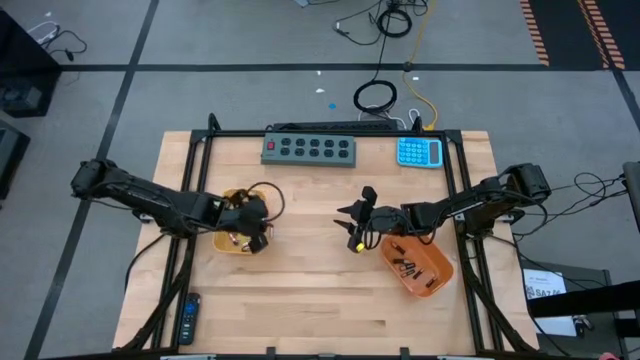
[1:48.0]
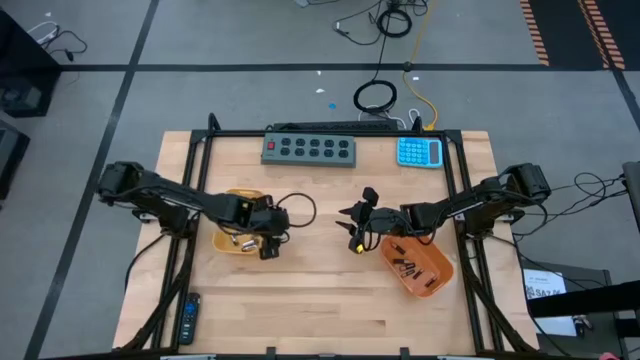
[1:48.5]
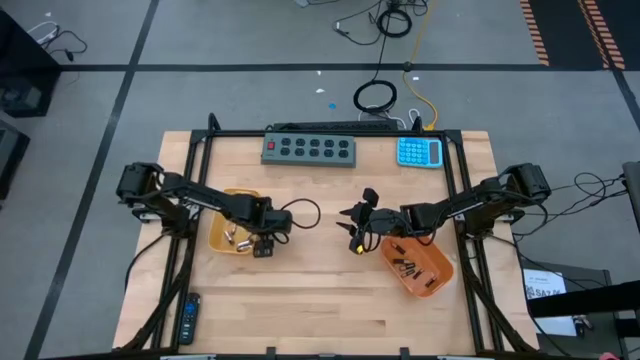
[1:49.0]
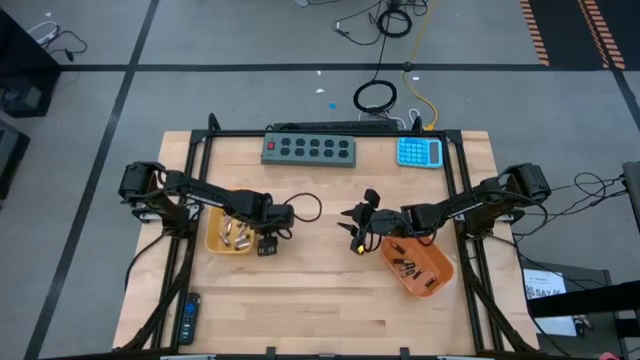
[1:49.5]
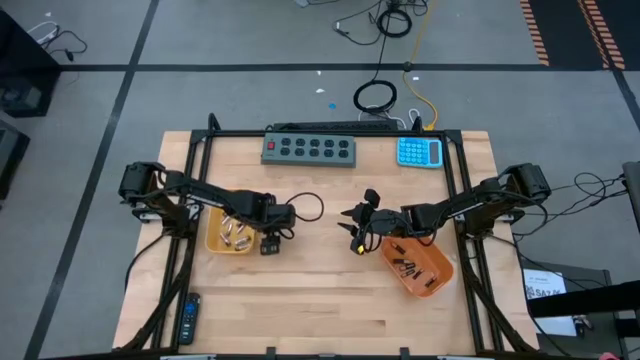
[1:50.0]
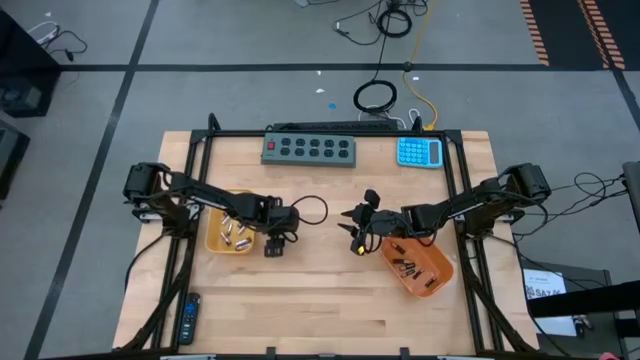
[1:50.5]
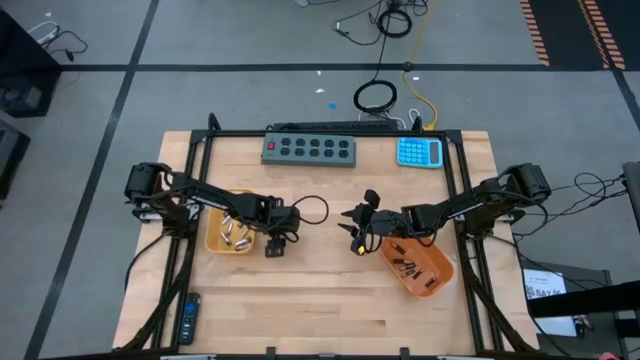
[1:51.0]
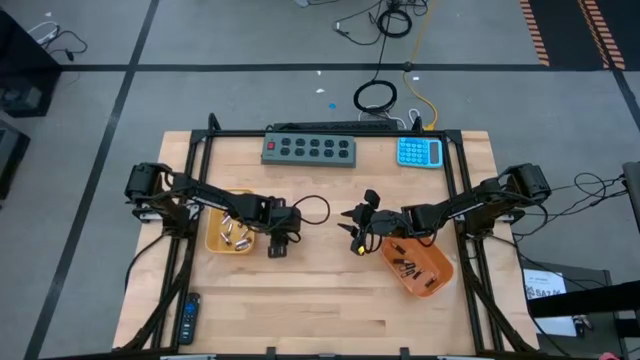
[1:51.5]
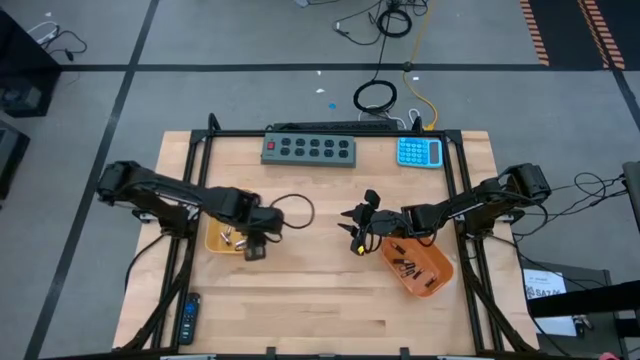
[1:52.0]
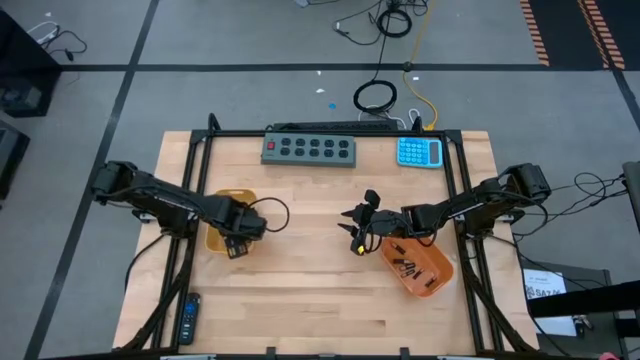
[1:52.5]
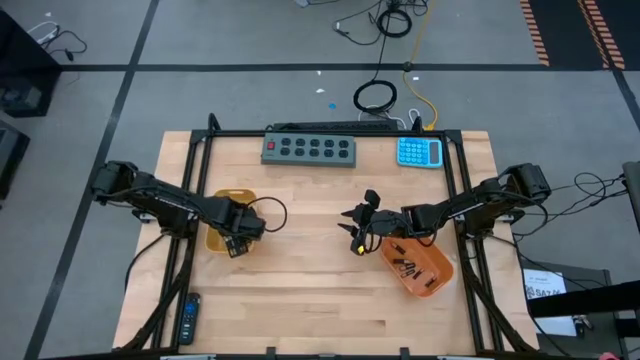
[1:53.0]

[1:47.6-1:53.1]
Task: Sort batteries
Put the silver battery into the yellow bin

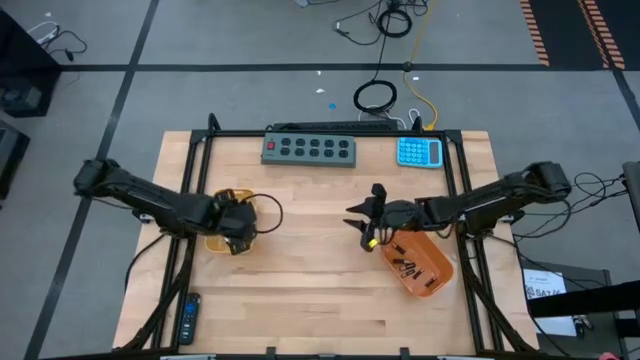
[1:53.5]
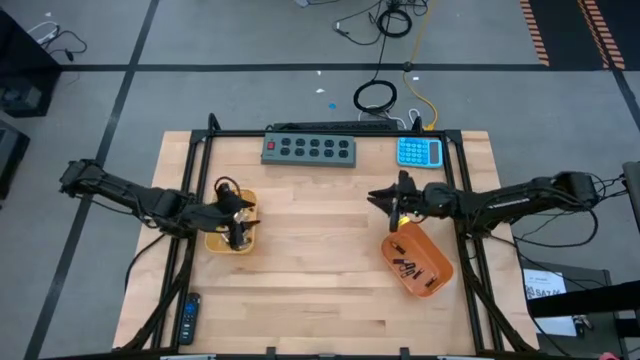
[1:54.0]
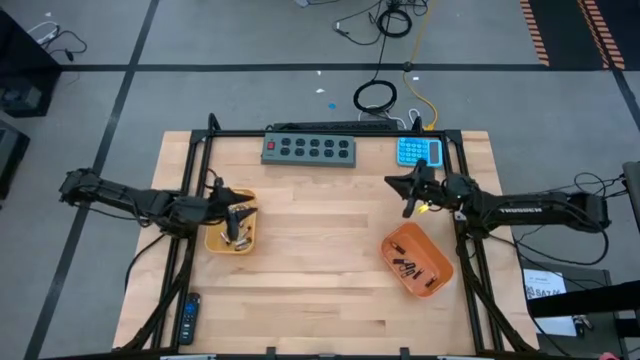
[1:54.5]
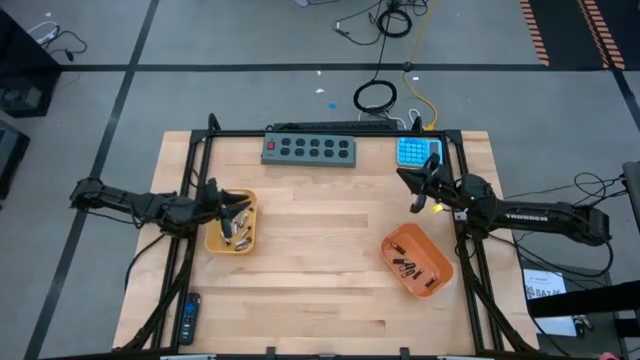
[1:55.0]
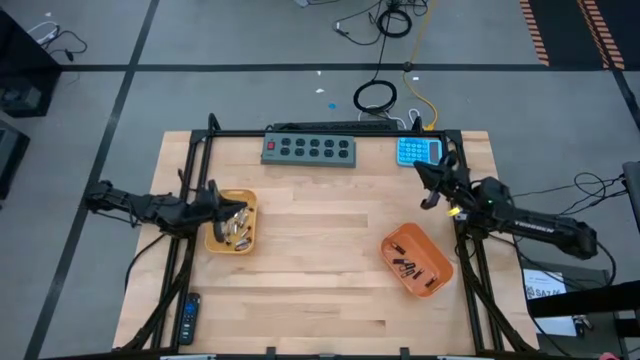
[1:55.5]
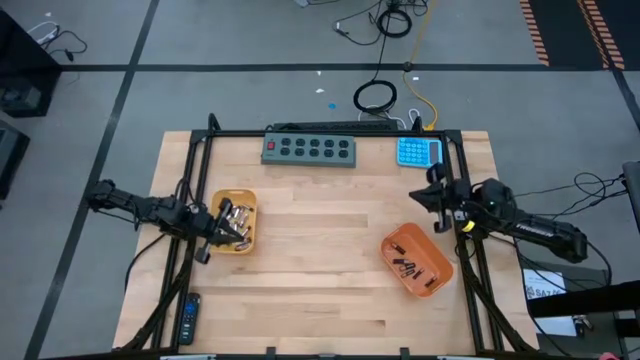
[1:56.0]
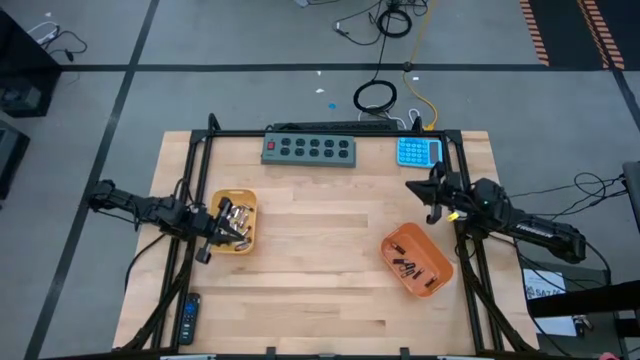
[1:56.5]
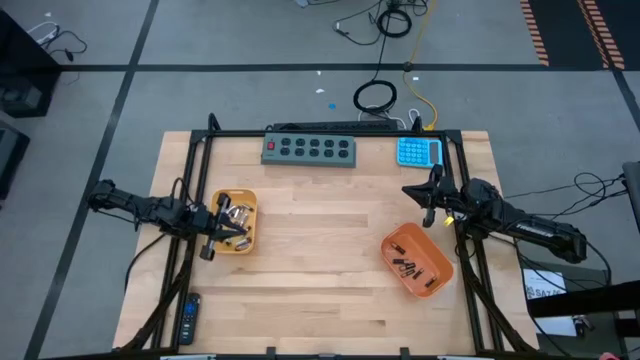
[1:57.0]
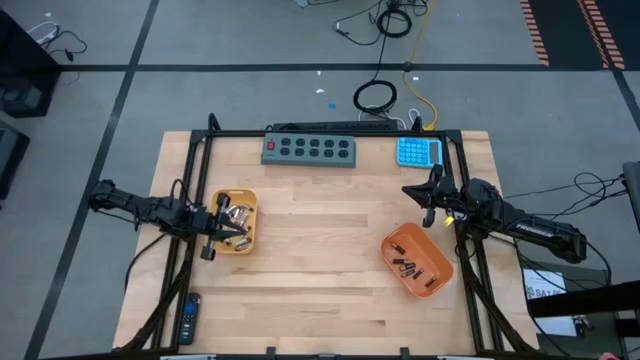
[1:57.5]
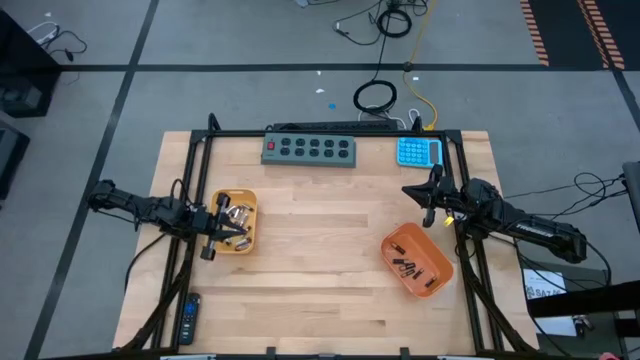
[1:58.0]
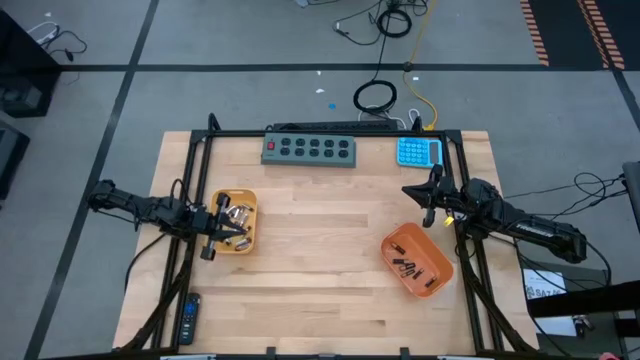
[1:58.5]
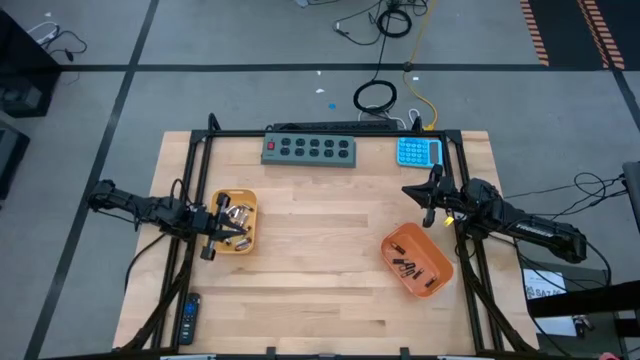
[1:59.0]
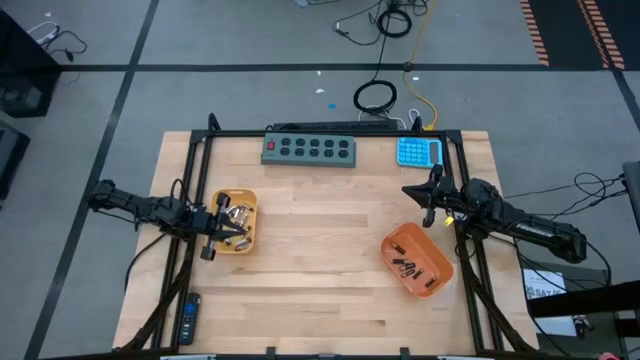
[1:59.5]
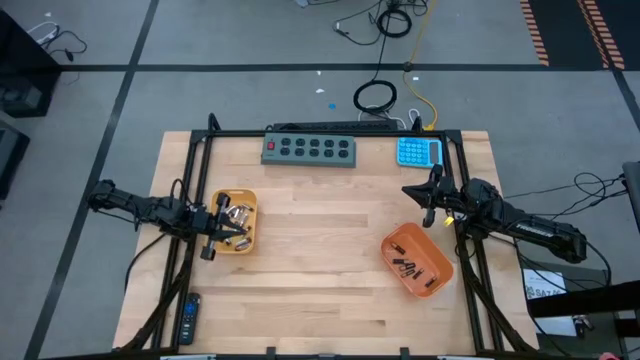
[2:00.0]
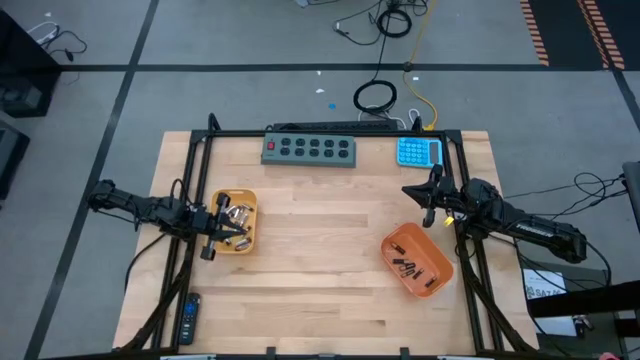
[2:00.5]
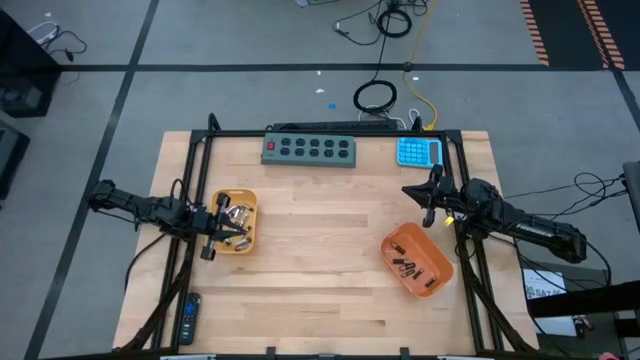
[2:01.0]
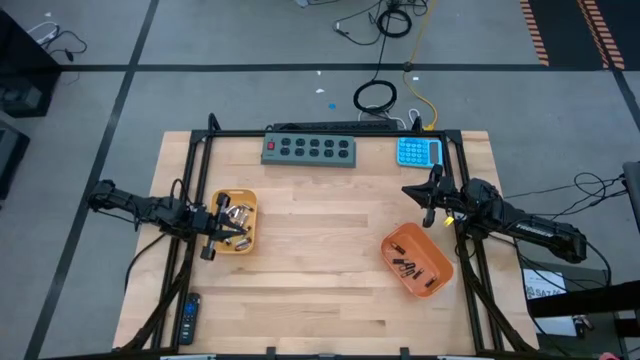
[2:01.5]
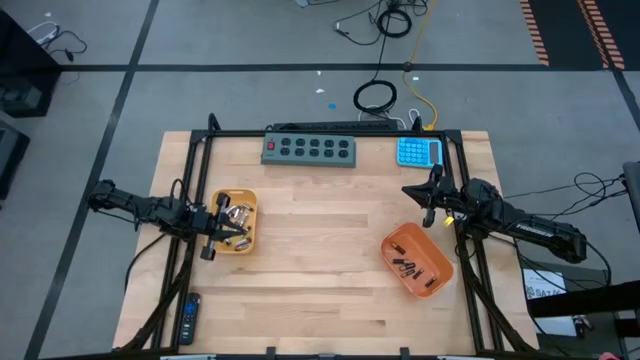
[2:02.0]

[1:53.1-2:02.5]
Return to Home Position
